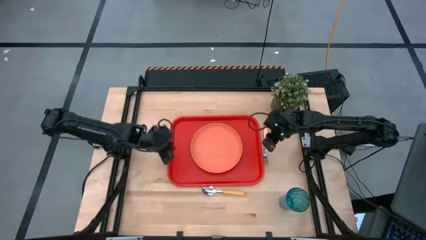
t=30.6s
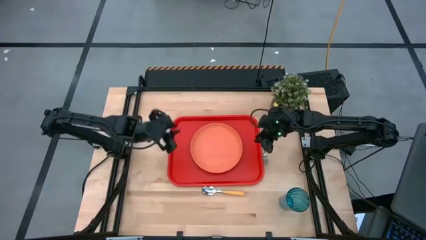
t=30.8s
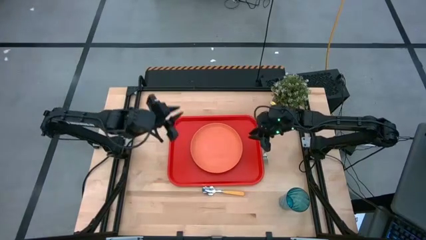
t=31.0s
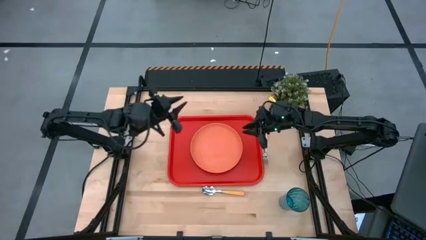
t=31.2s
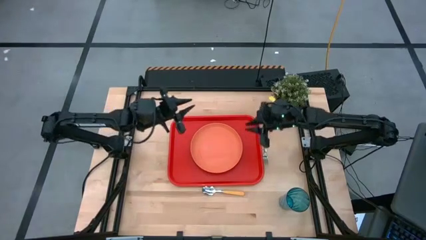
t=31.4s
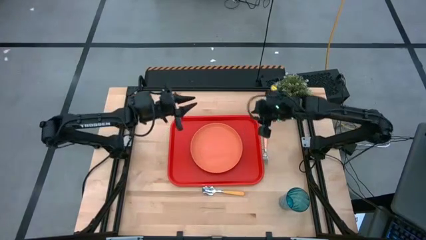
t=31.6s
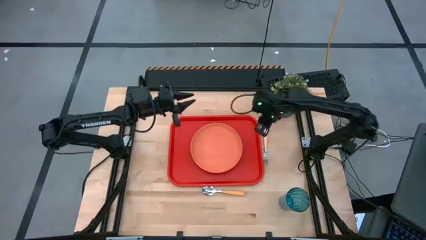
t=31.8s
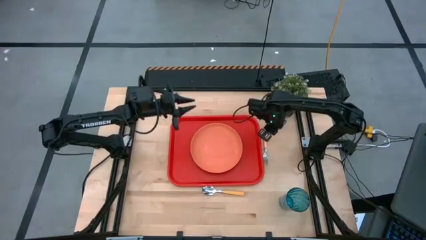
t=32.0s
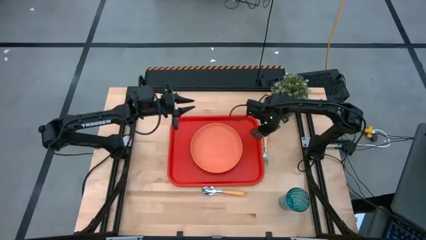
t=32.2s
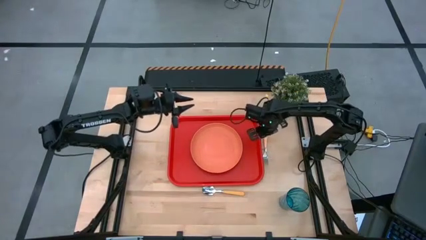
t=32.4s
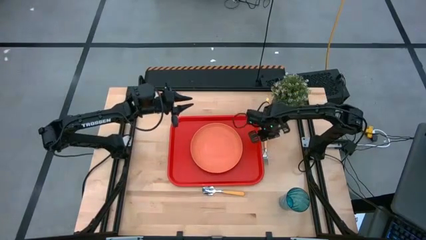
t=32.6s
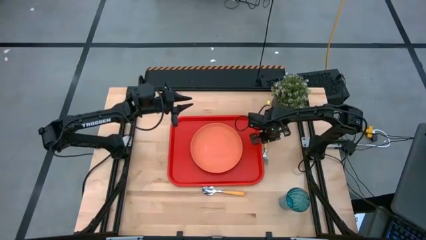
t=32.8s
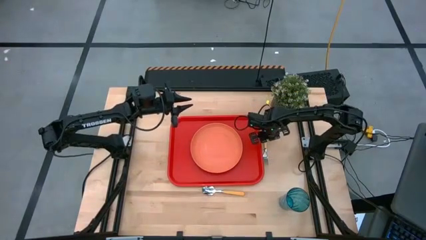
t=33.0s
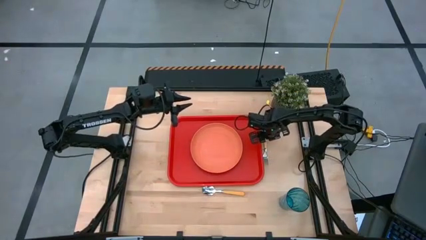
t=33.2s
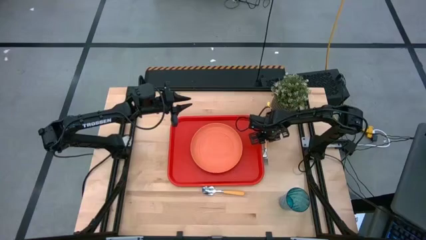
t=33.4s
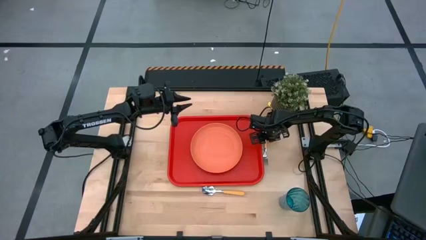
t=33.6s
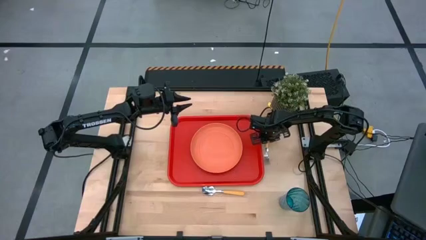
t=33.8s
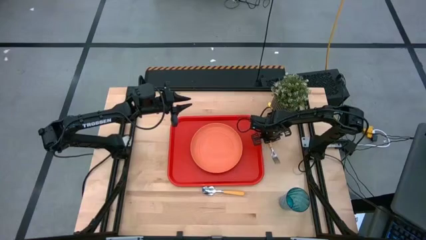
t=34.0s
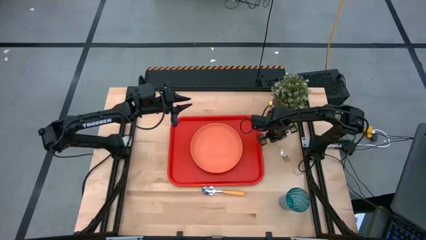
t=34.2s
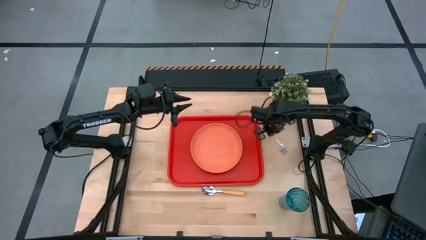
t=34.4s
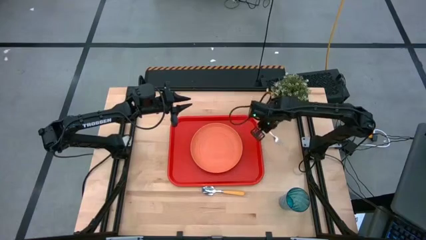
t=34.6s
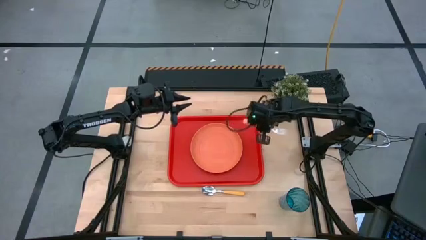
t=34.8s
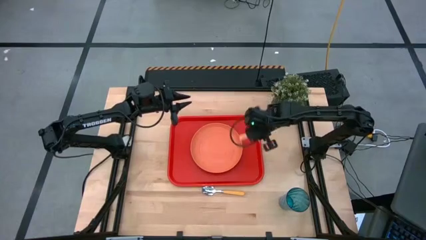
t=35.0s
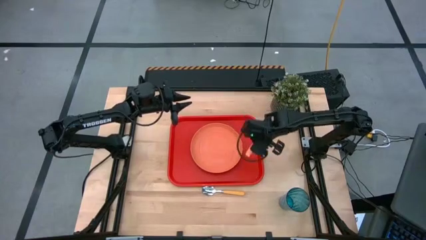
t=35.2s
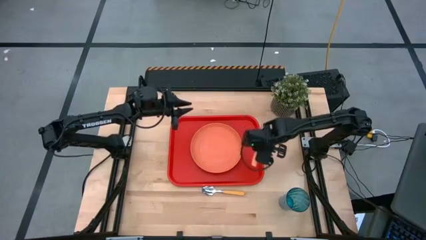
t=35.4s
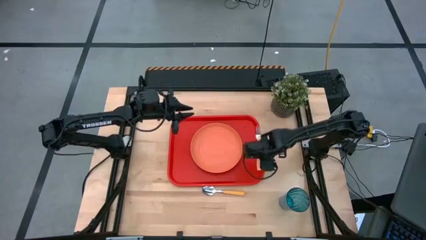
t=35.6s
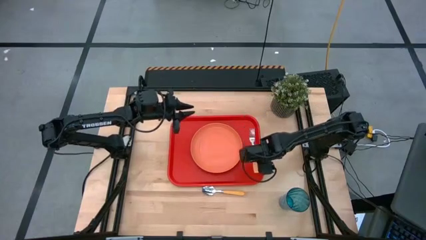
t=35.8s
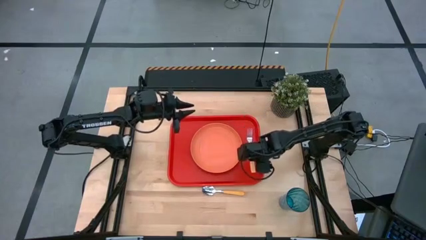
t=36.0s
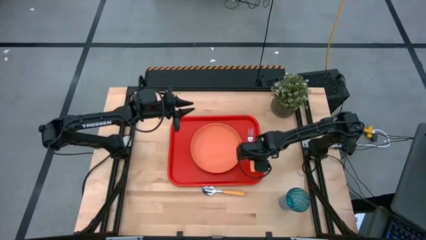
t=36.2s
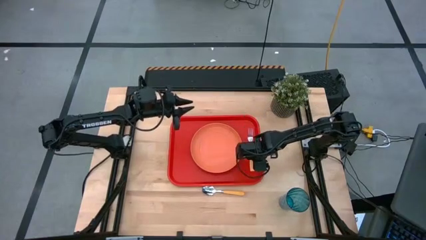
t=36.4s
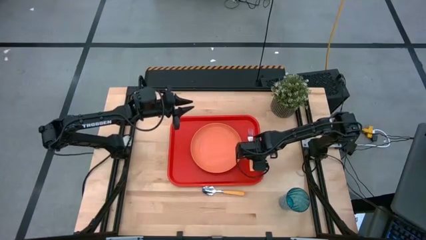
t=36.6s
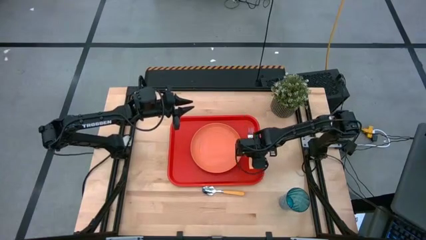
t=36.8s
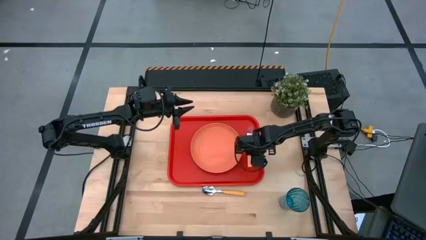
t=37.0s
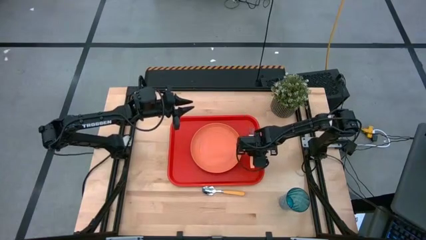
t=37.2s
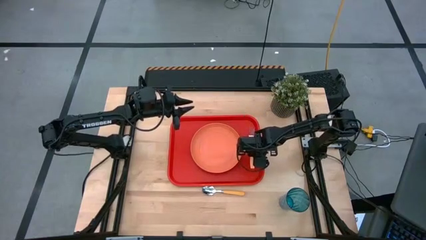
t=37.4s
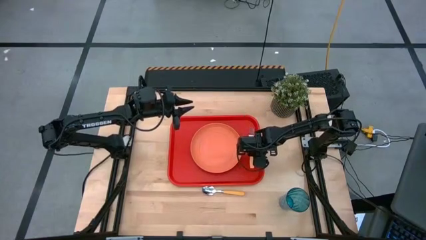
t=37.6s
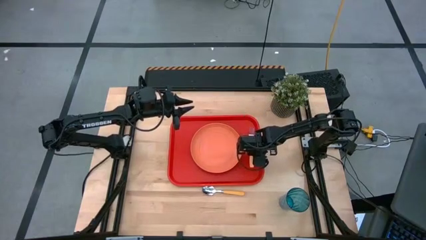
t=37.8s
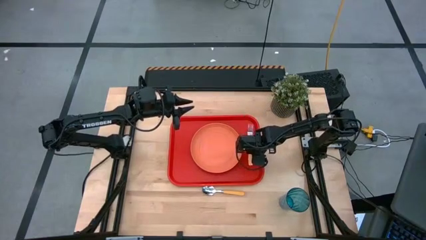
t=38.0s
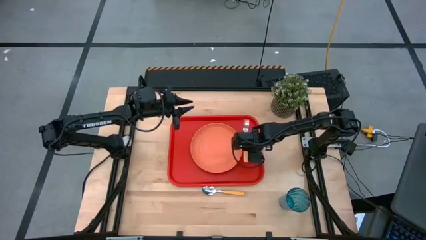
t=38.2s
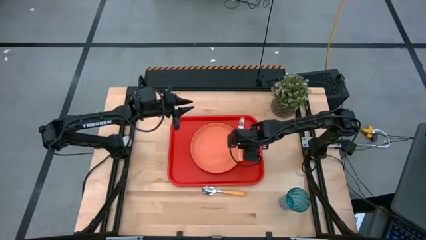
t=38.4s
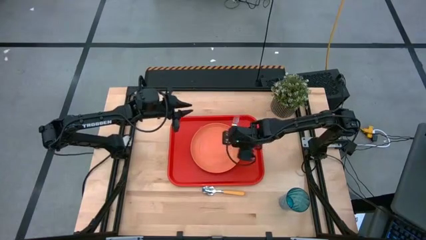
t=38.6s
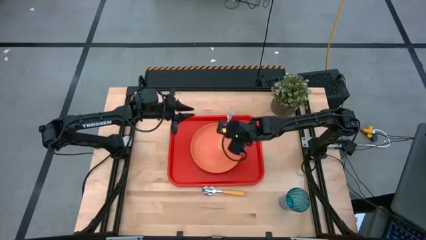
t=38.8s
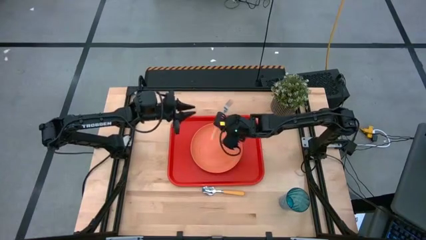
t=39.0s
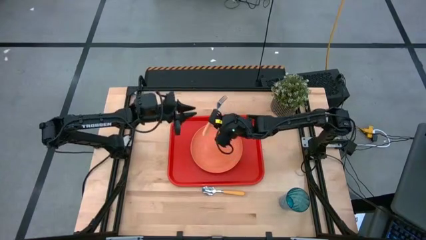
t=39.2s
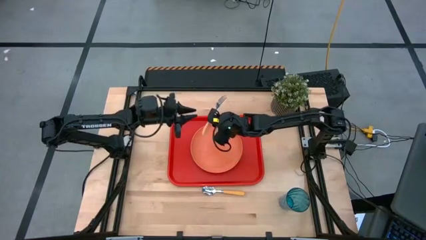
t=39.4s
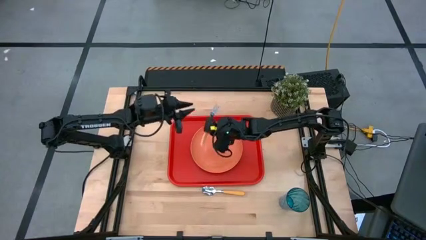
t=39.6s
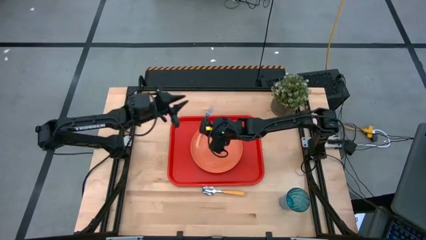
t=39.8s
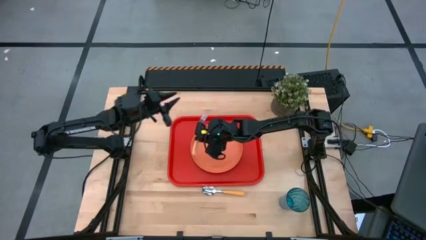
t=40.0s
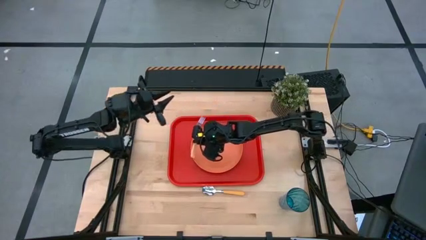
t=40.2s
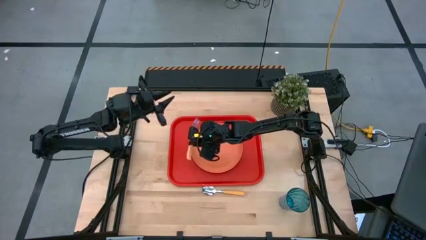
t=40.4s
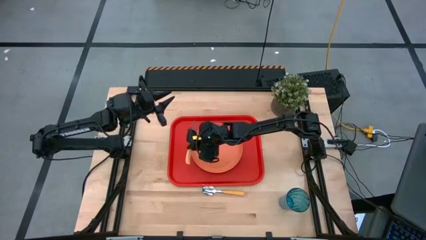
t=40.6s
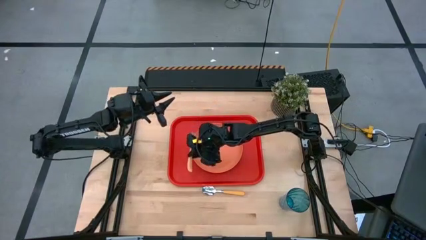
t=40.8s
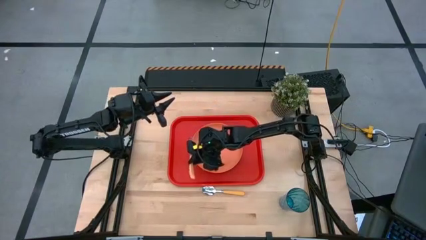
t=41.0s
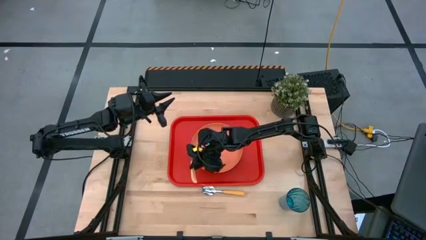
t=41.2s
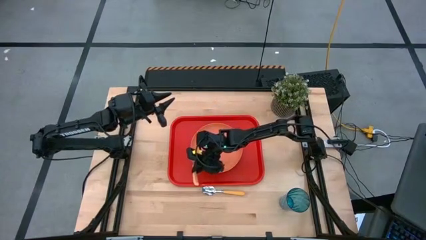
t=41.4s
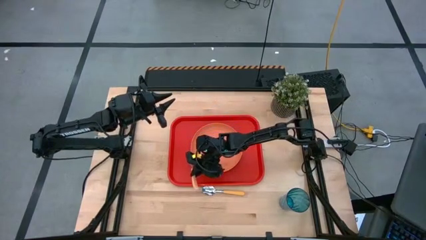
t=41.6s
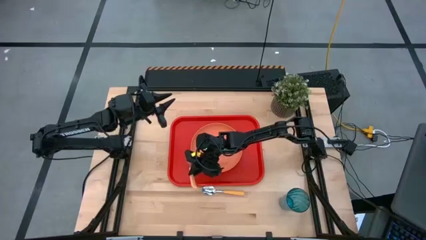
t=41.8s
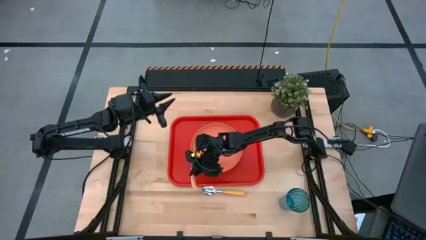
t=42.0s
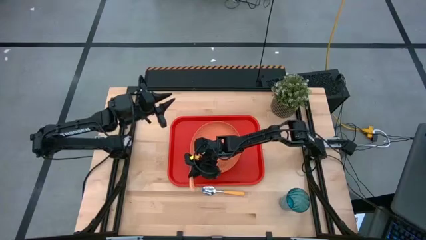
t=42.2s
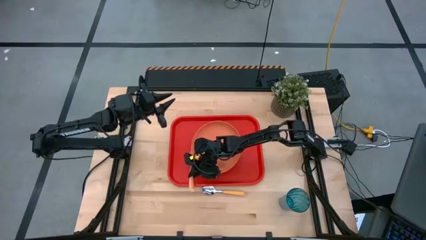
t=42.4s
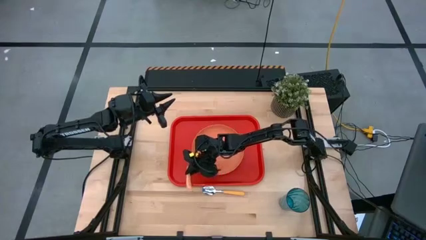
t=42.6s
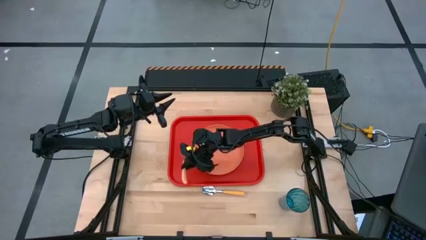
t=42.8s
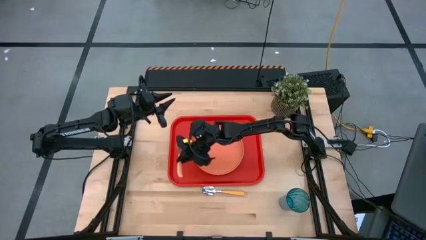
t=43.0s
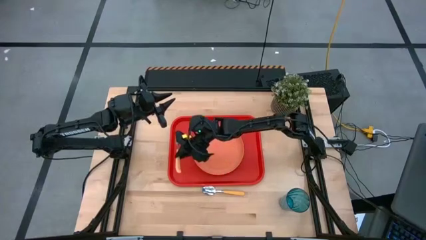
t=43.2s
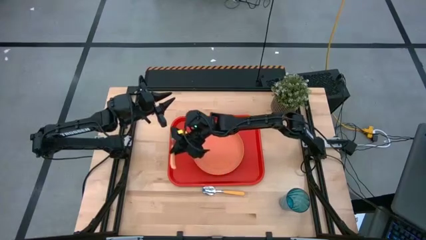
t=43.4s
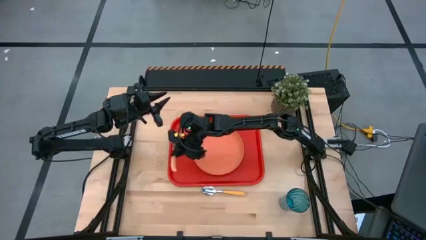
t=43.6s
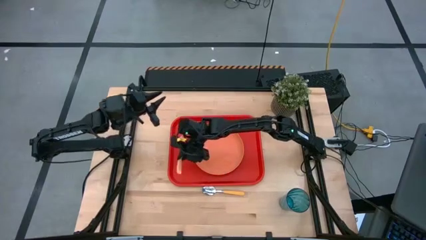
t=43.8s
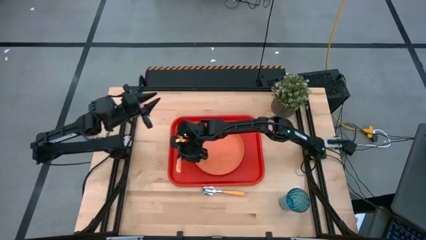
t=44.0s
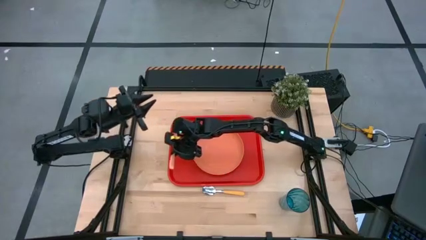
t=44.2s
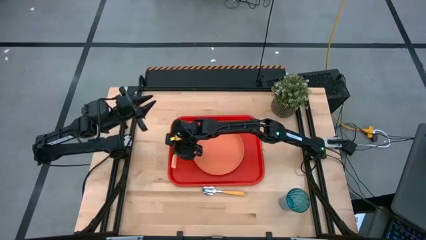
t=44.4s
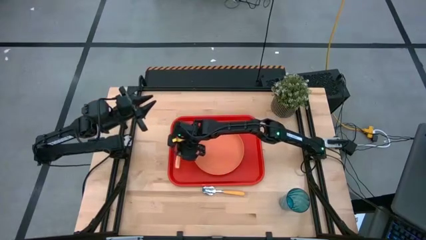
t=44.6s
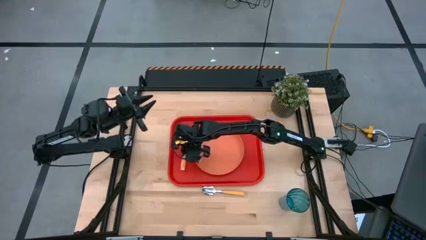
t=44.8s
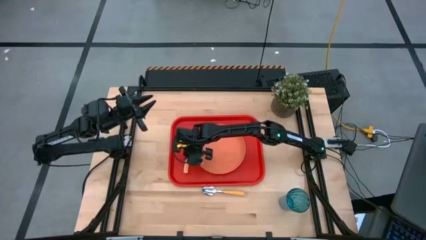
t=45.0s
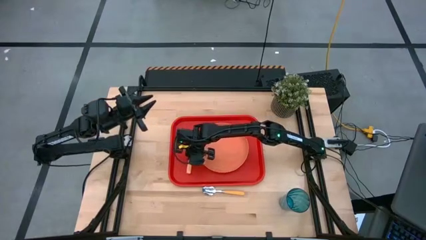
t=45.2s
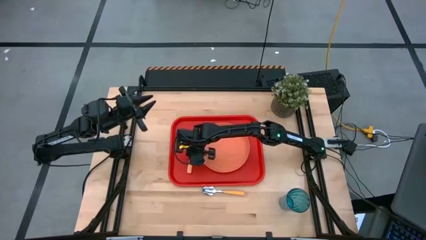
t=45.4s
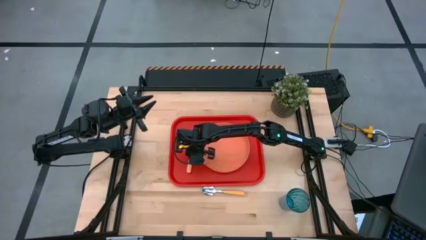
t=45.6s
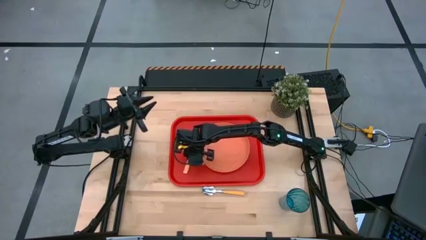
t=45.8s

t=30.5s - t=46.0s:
Task: Pick and place plate/cup/fork/spoon on tray
Put the light orange fork on the serving tray
